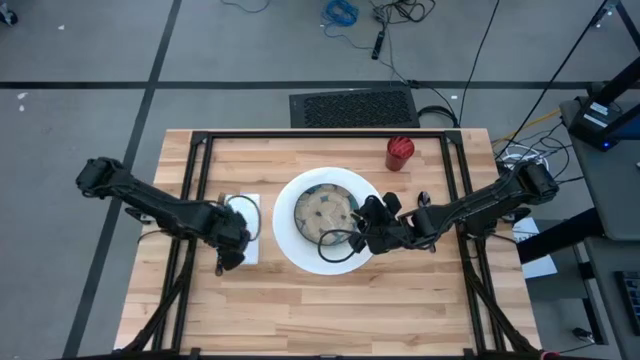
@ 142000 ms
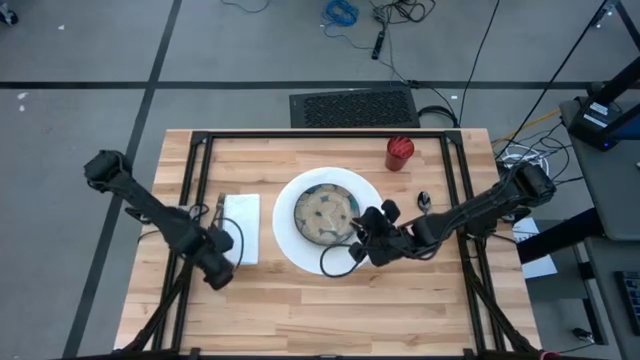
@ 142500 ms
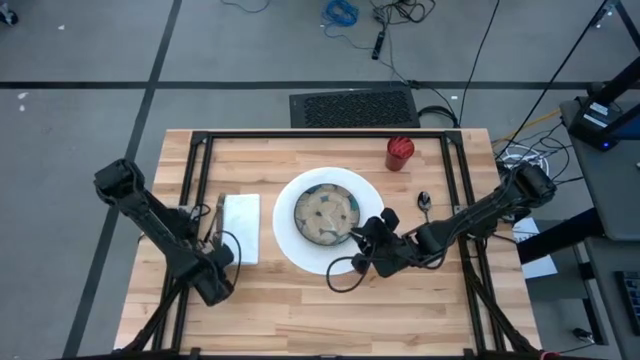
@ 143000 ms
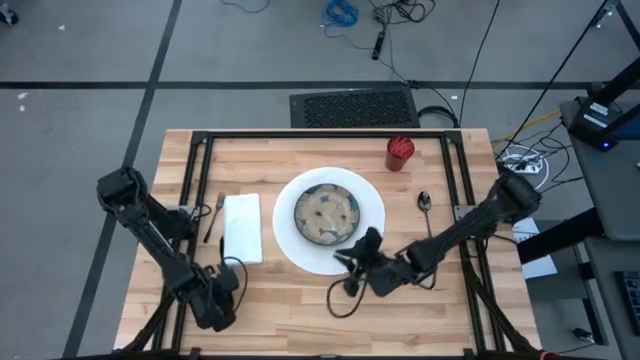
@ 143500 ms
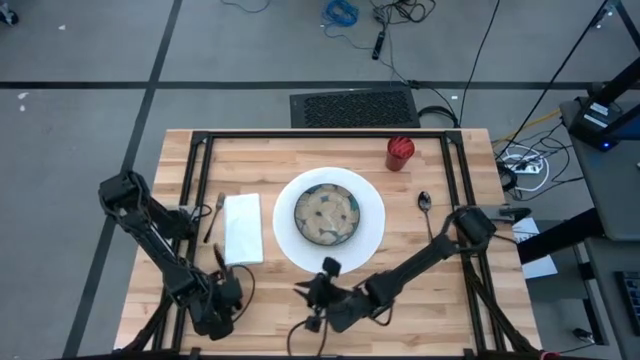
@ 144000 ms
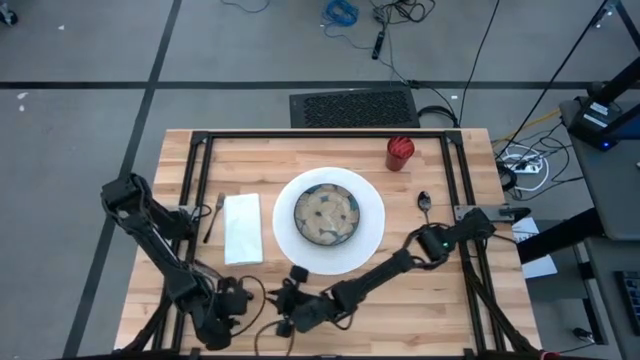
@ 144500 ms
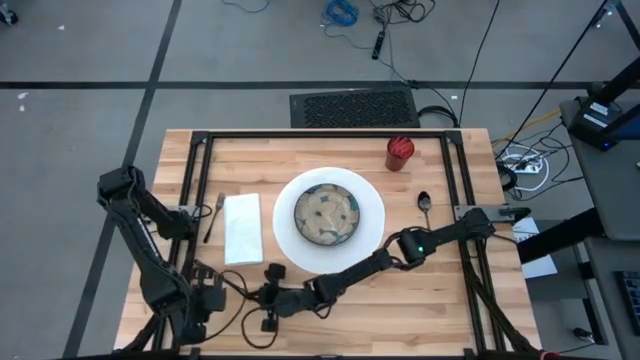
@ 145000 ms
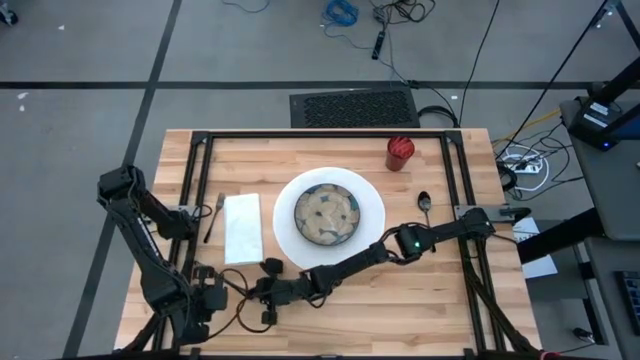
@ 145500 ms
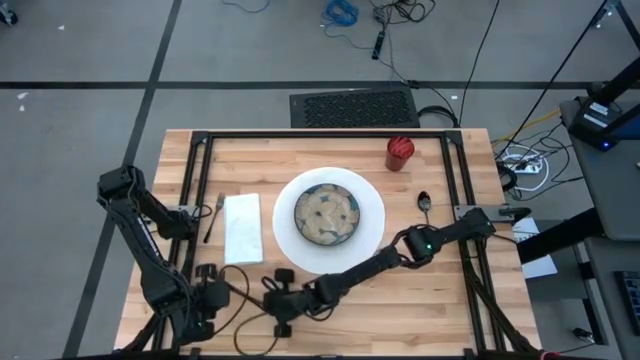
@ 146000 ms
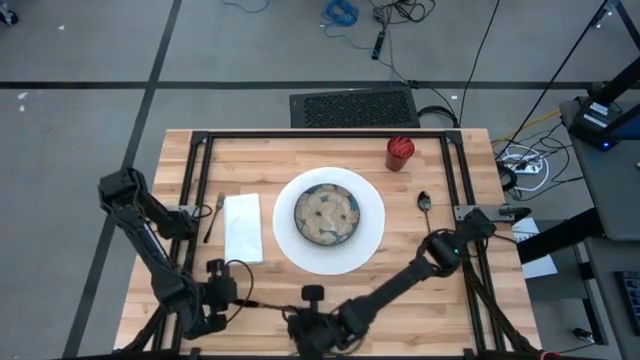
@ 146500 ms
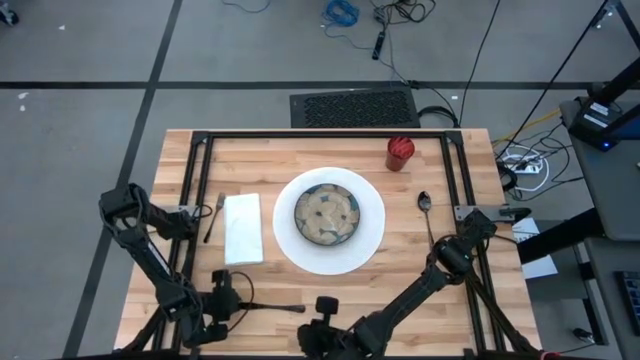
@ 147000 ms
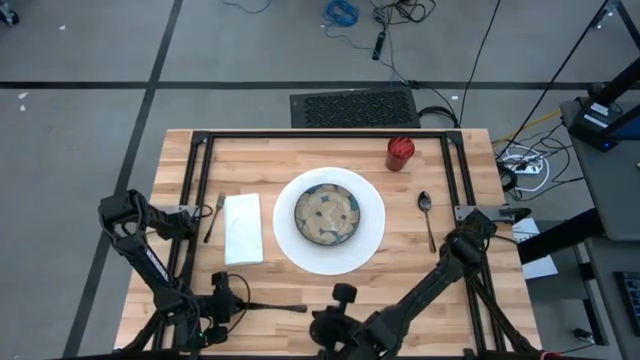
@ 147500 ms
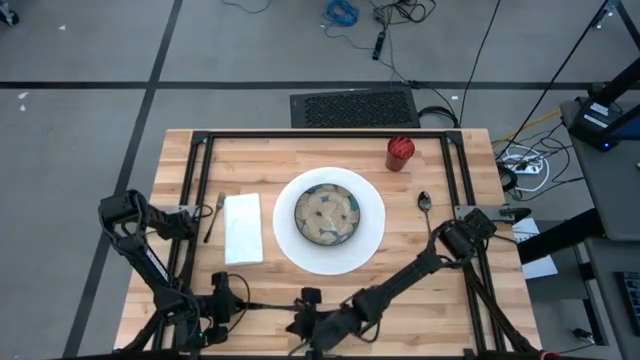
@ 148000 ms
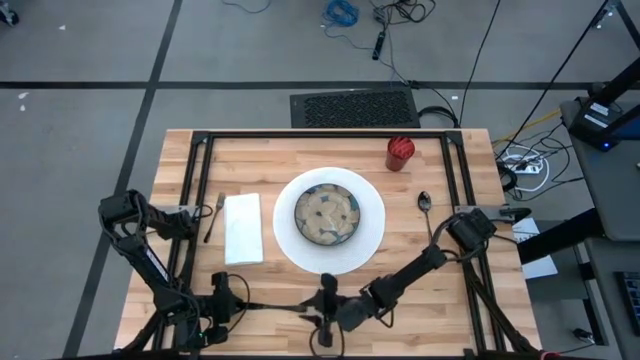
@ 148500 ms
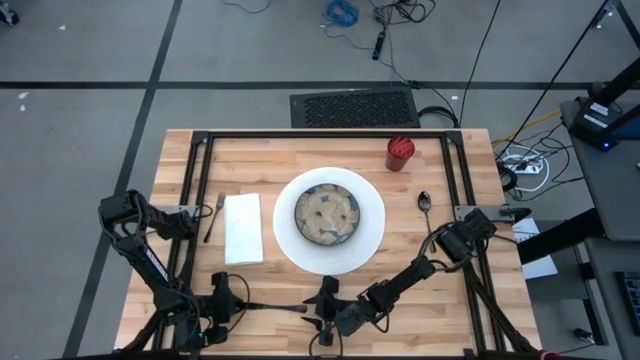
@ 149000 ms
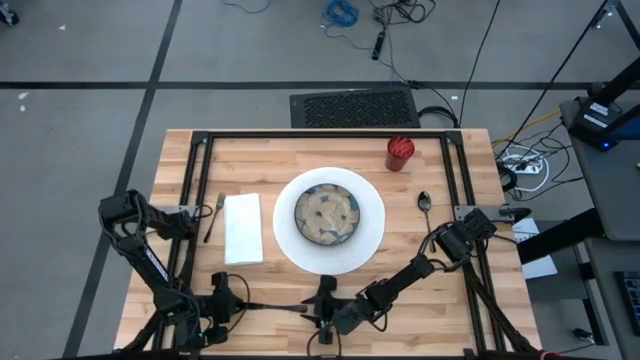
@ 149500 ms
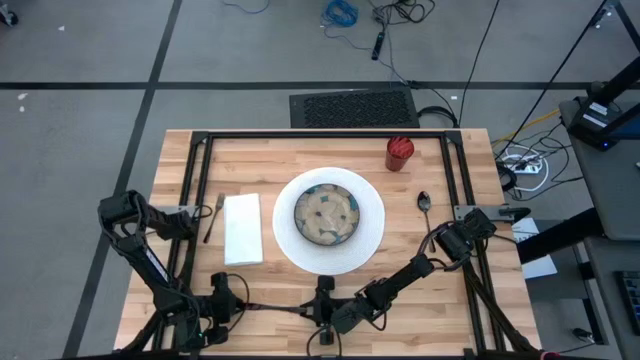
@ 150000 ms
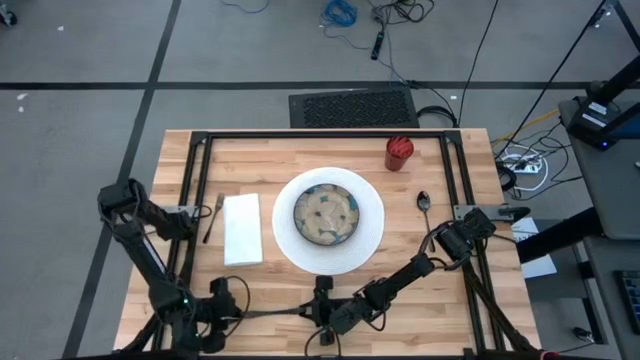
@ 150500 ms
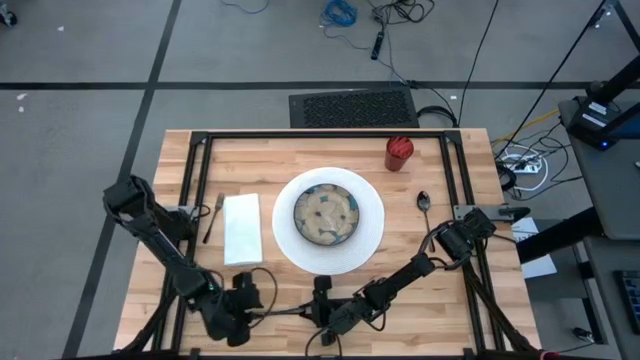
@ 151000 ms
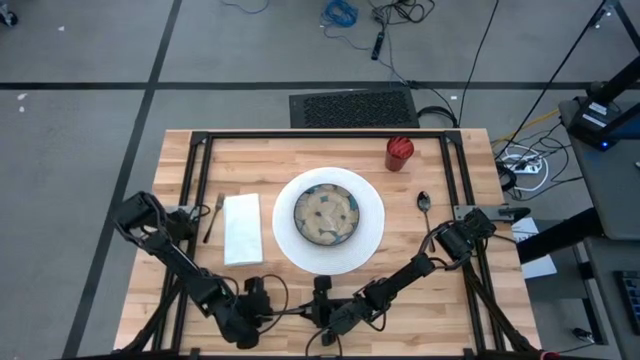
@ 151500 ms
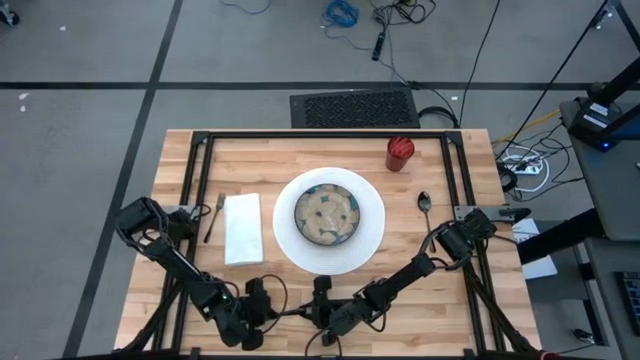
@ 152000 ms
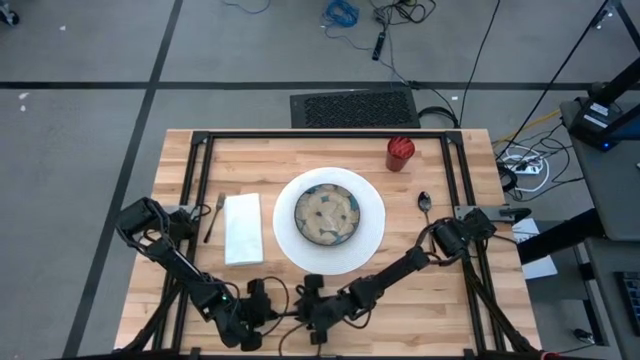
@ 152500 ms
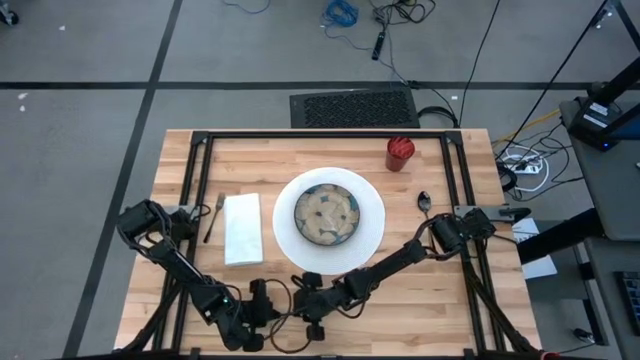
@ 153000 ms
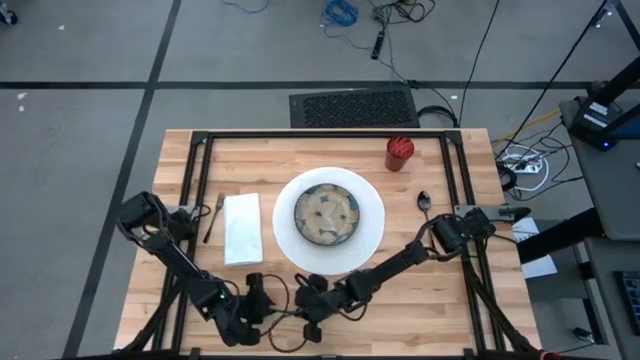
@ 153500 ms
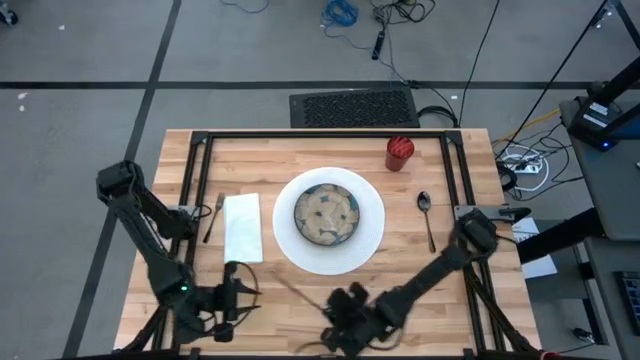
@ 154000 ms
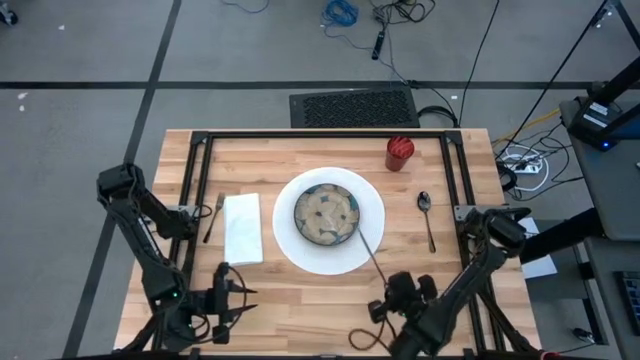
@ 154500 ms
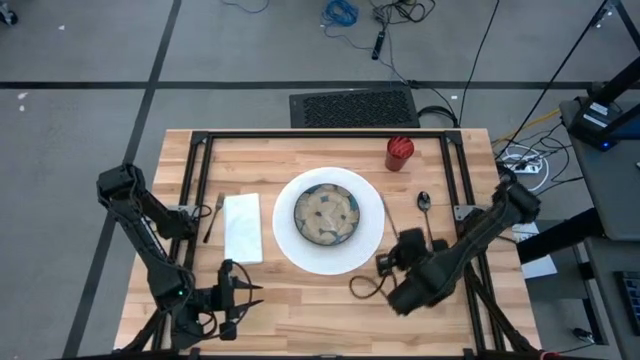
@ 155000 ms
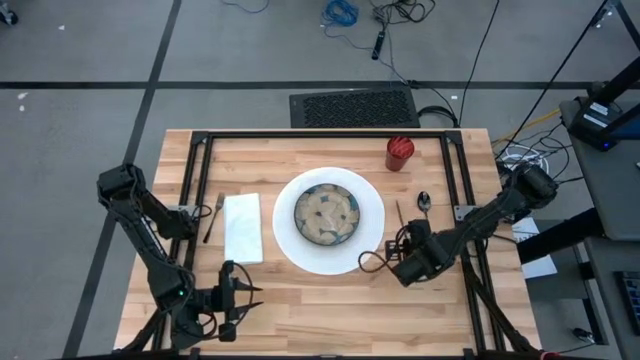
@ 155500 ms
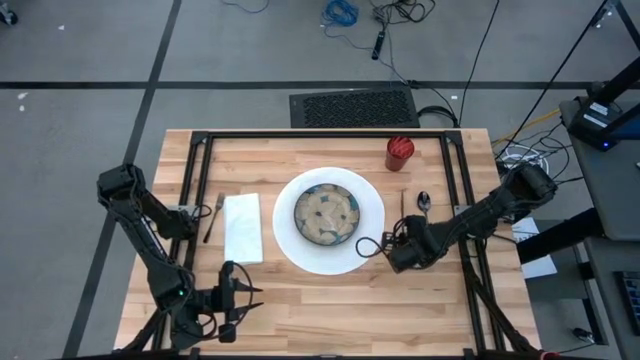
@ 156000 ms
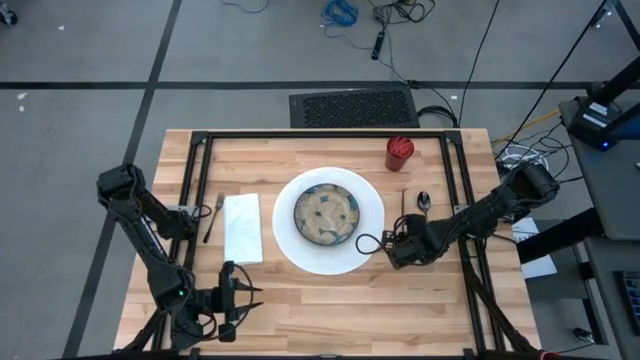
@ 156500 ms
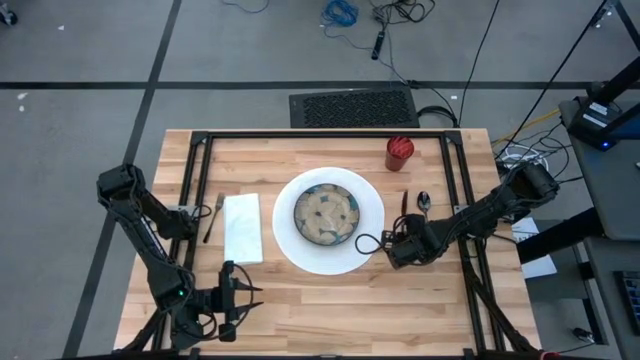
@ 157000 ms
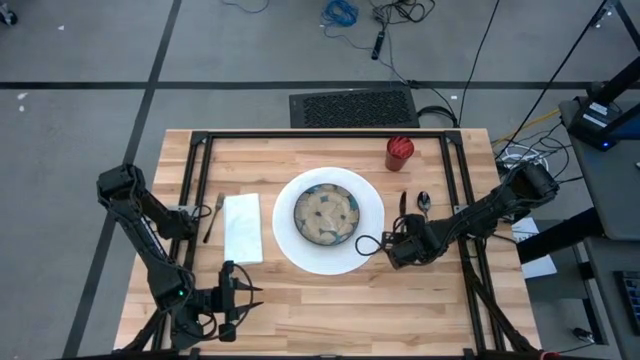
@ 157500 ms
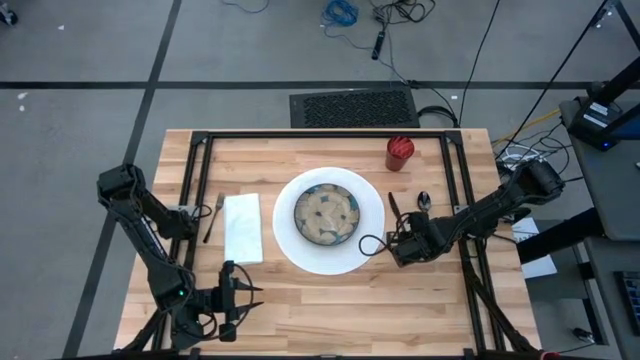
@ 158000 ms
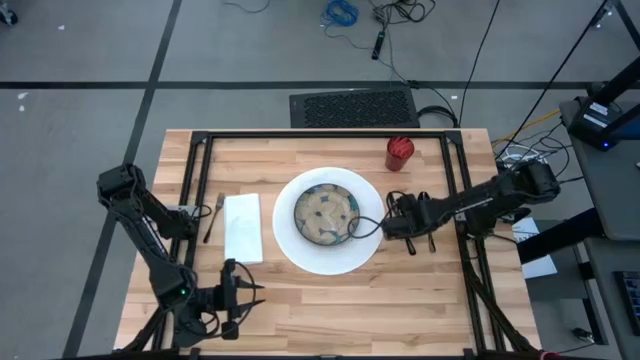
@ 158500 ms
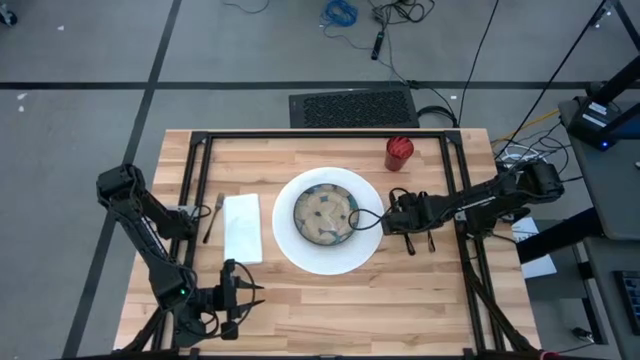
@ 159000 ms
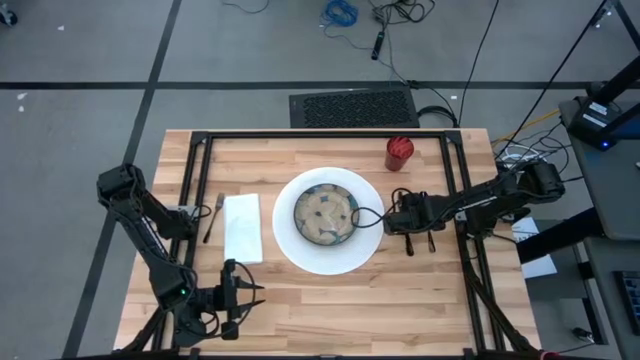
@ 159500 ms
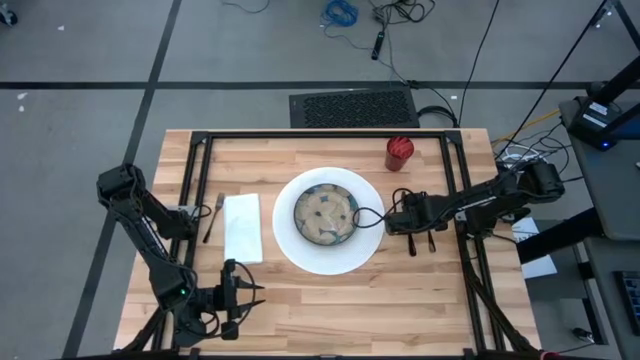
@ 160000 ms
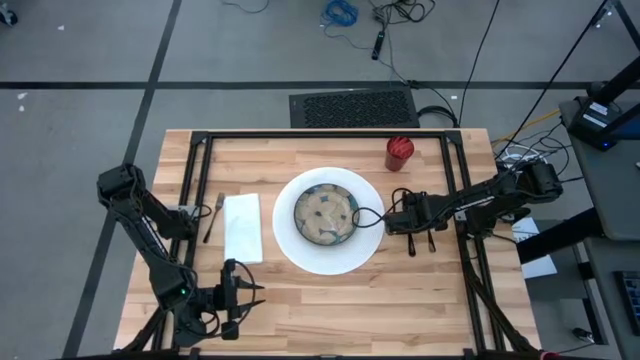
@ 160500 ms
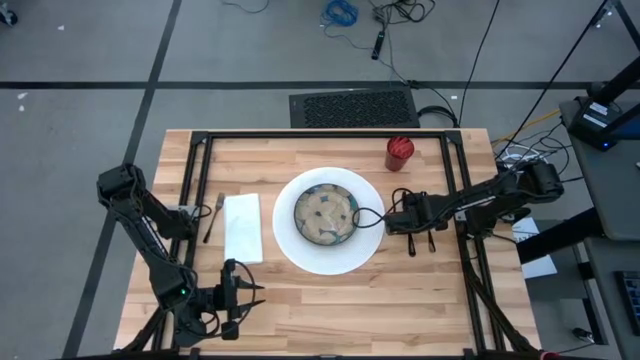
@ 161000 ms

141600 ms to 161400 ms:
Task: Set table place
Put the black table knife beside the white table mat

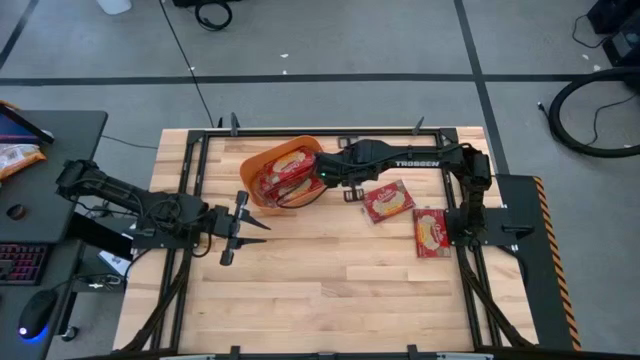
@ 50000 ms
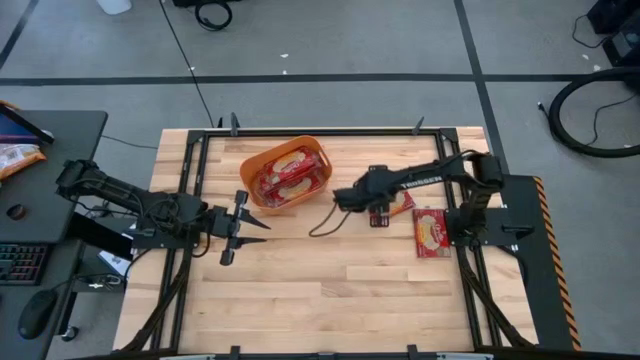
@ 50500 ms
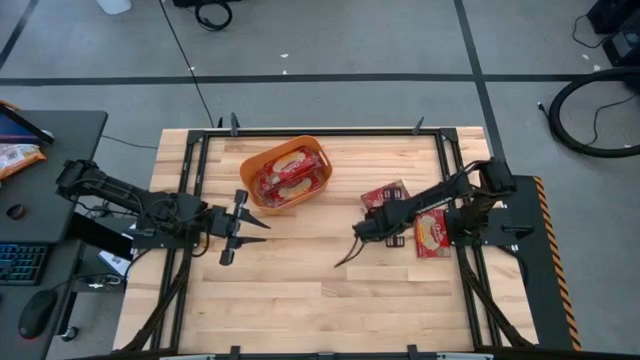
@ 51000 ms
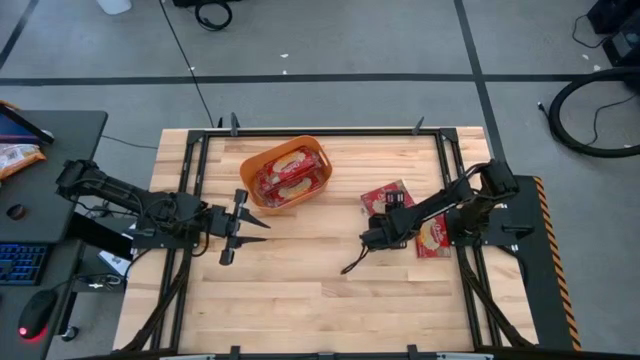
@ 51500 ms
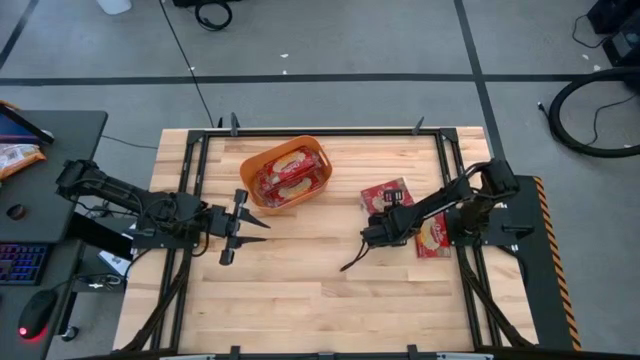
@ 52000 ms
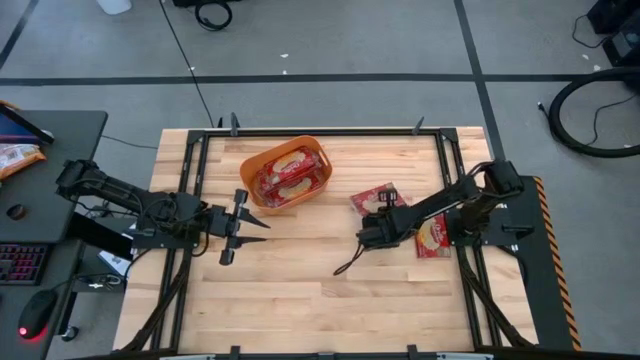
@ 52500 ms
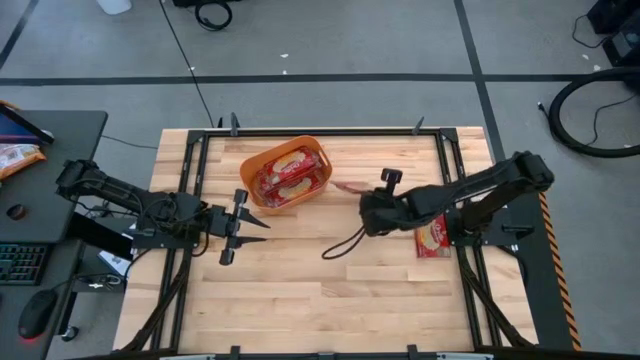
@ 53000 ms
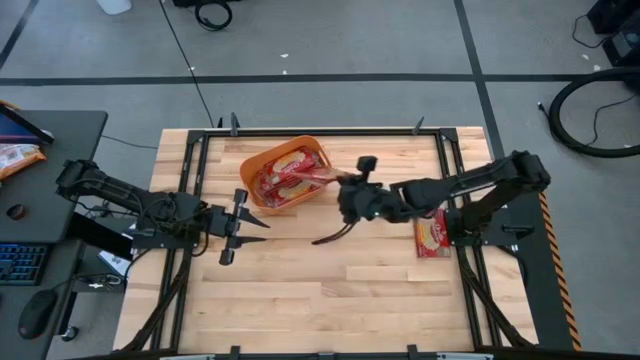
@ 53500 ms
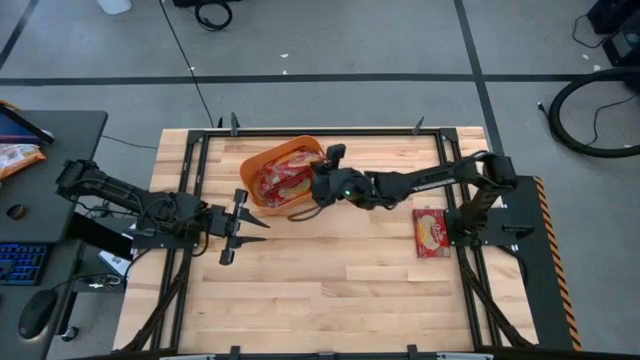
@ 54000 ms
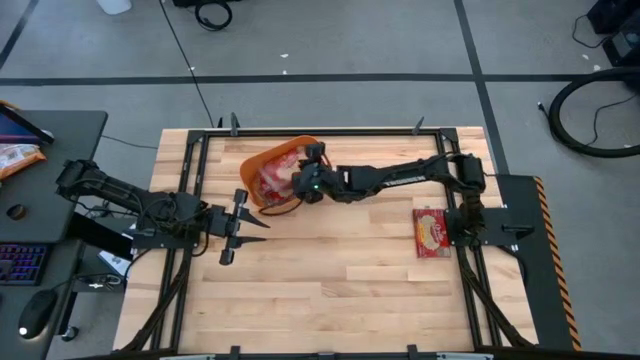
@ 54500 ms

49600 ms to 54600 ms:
Task: Sort popcorn bags into baskets
Put the red popcorn bag into the orange bin
